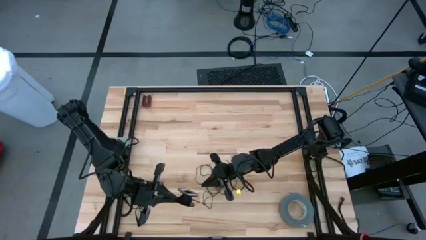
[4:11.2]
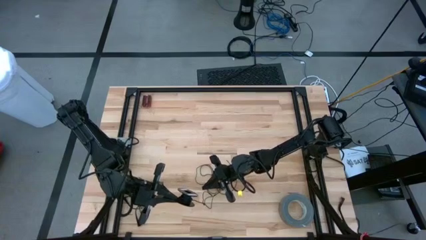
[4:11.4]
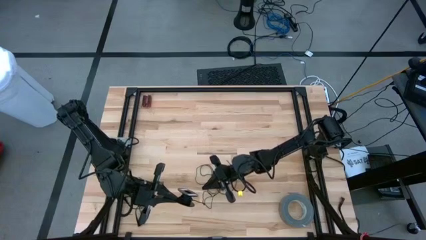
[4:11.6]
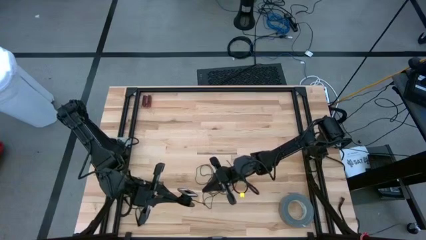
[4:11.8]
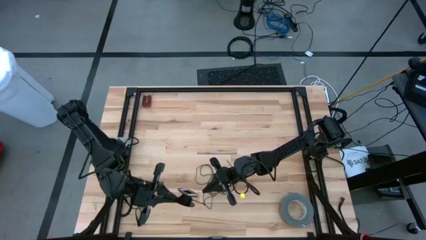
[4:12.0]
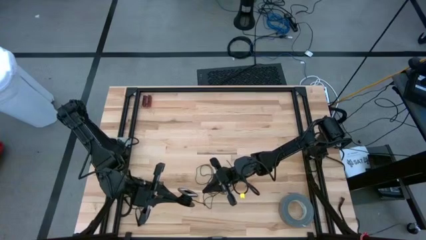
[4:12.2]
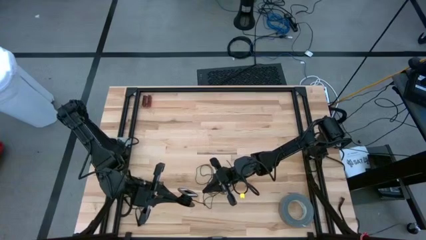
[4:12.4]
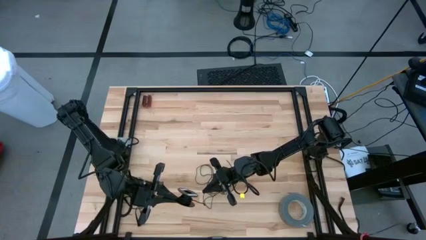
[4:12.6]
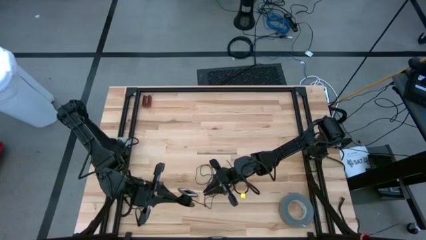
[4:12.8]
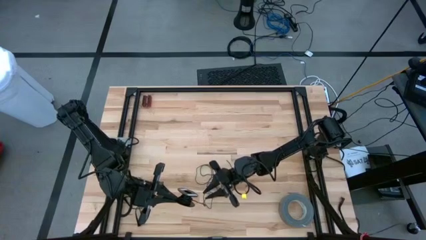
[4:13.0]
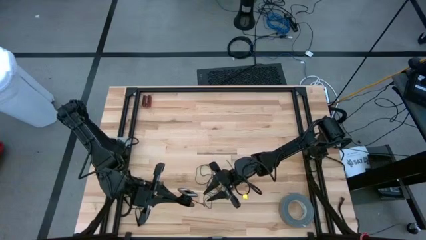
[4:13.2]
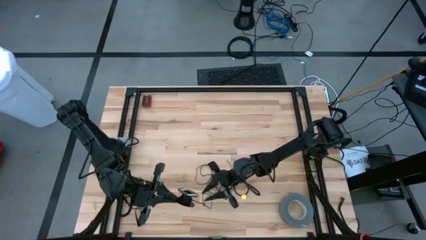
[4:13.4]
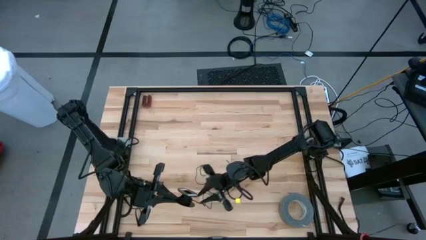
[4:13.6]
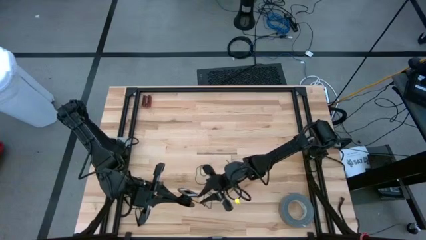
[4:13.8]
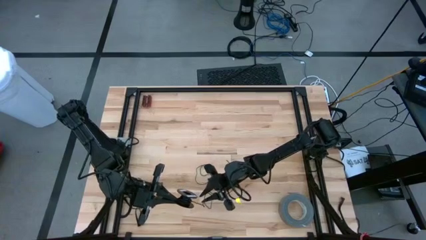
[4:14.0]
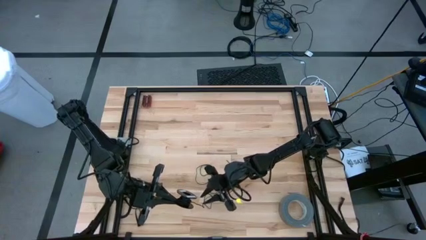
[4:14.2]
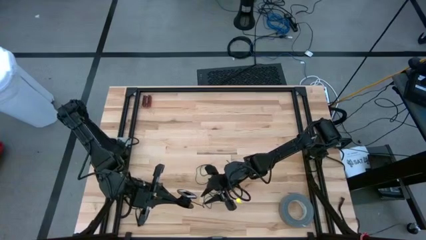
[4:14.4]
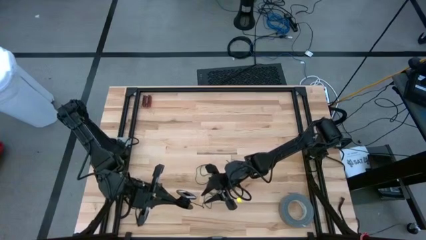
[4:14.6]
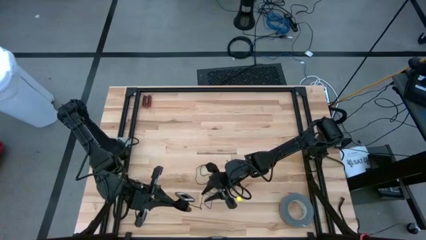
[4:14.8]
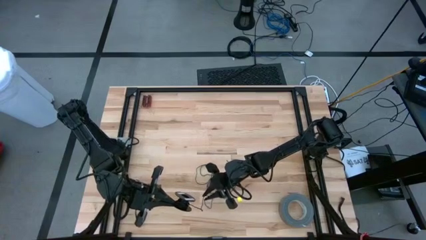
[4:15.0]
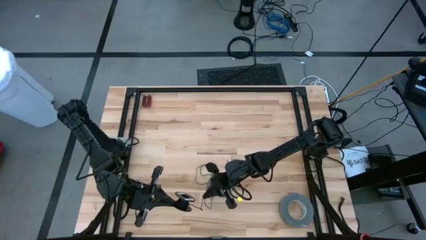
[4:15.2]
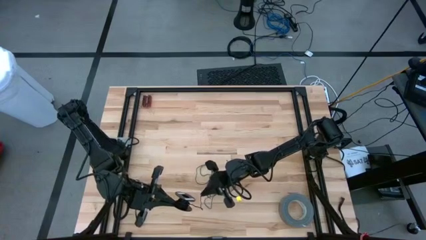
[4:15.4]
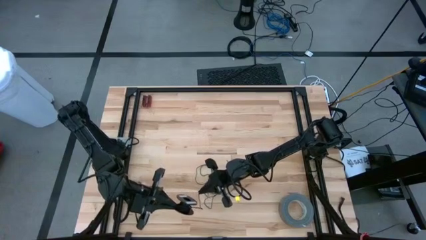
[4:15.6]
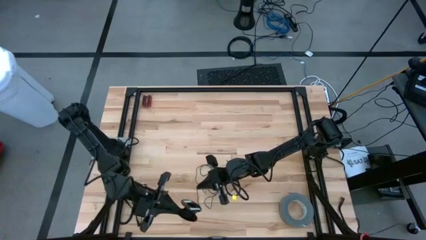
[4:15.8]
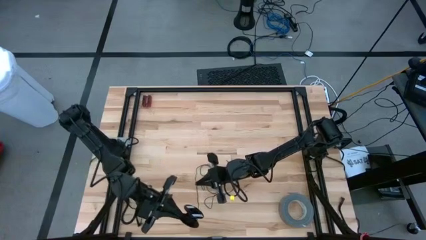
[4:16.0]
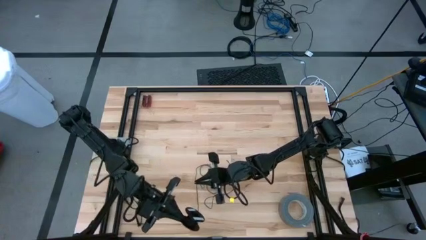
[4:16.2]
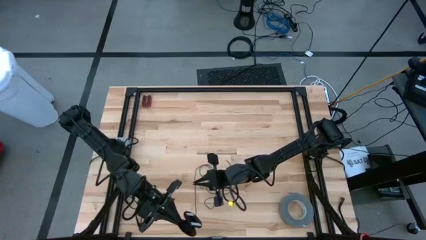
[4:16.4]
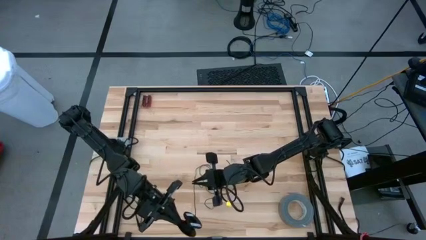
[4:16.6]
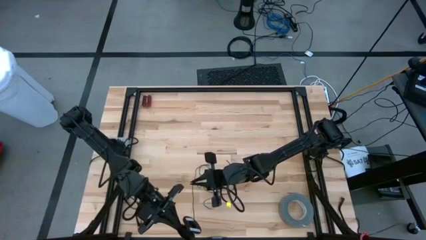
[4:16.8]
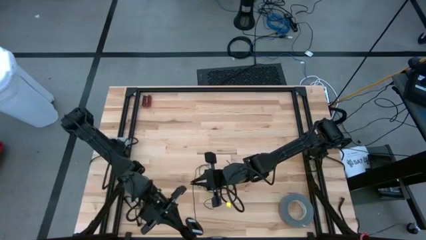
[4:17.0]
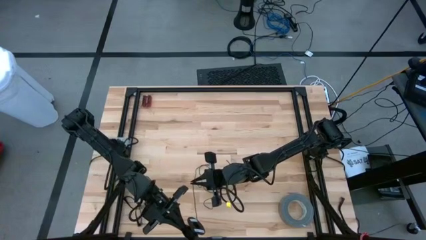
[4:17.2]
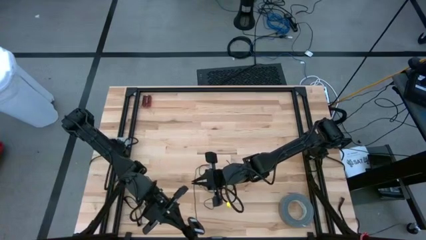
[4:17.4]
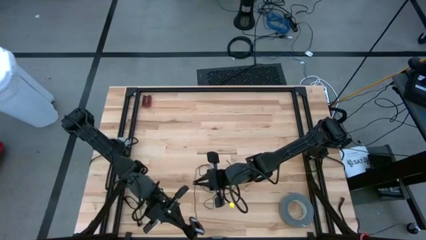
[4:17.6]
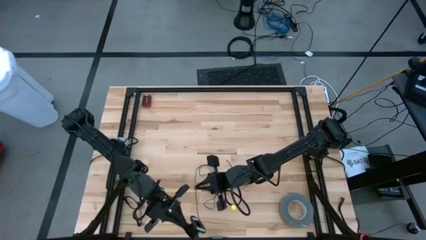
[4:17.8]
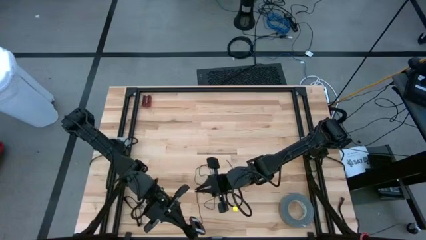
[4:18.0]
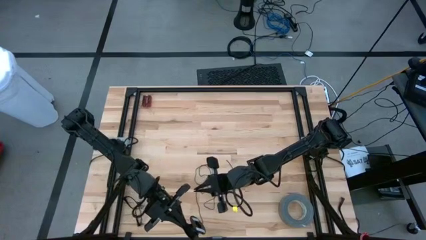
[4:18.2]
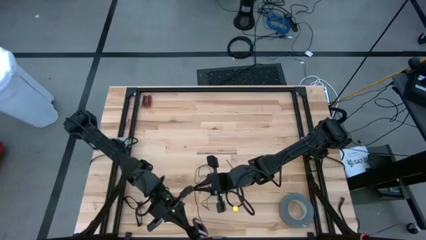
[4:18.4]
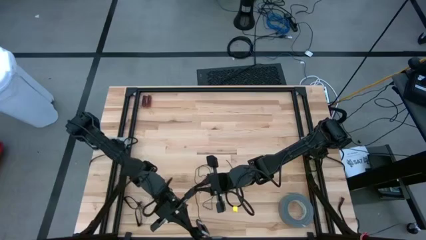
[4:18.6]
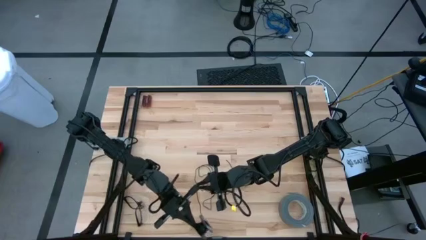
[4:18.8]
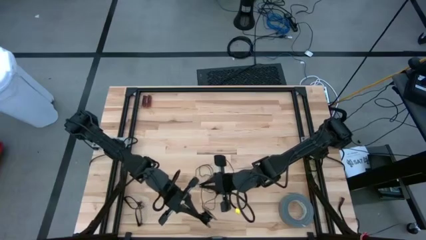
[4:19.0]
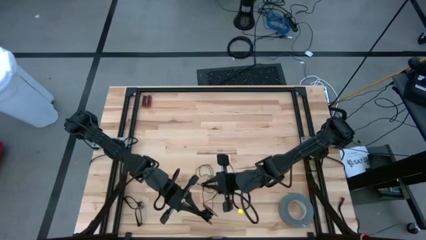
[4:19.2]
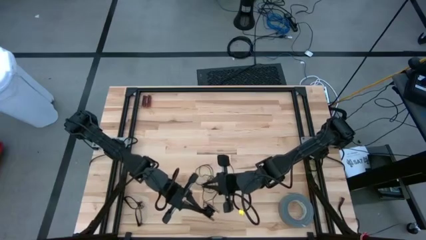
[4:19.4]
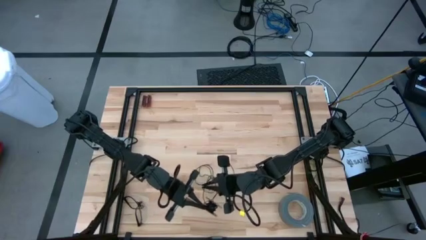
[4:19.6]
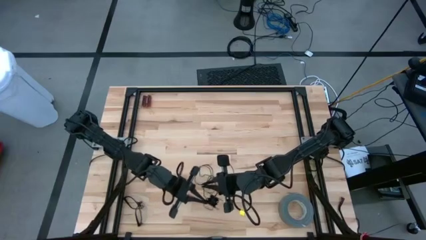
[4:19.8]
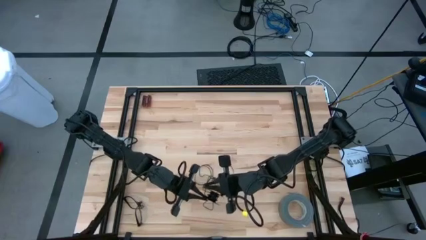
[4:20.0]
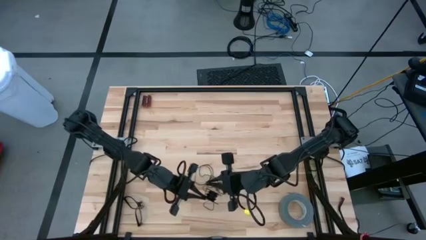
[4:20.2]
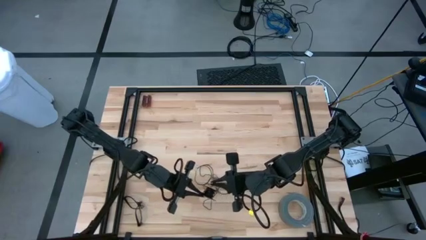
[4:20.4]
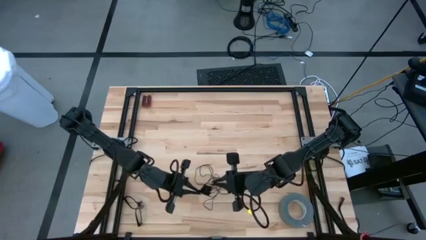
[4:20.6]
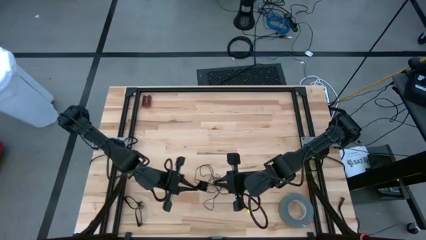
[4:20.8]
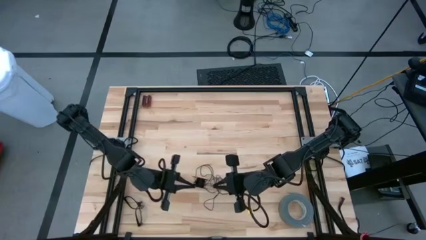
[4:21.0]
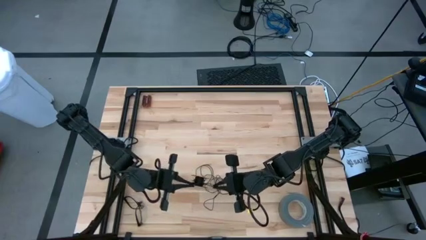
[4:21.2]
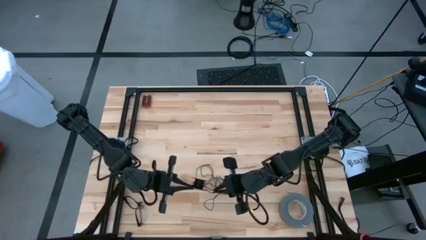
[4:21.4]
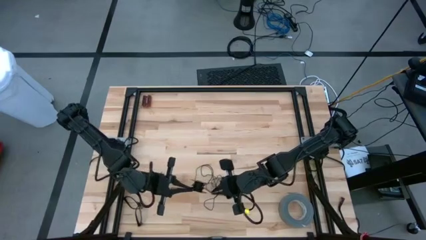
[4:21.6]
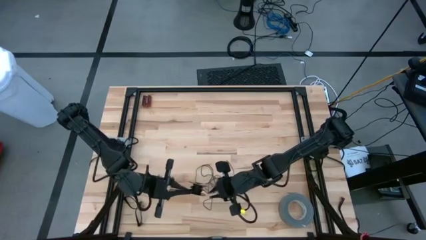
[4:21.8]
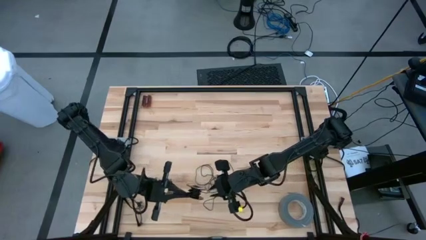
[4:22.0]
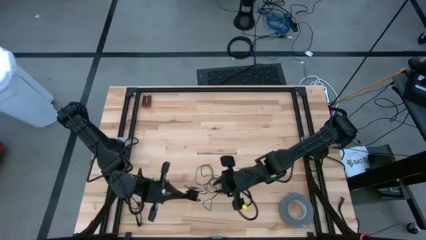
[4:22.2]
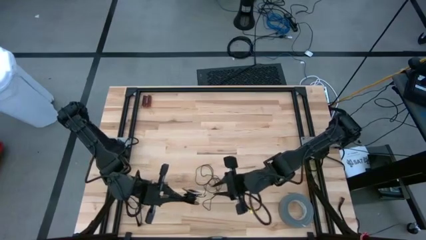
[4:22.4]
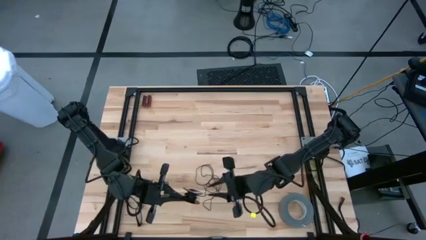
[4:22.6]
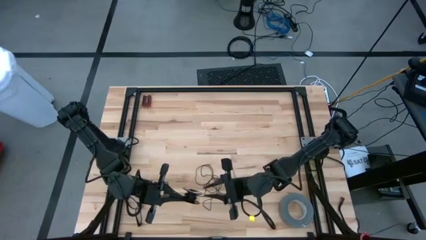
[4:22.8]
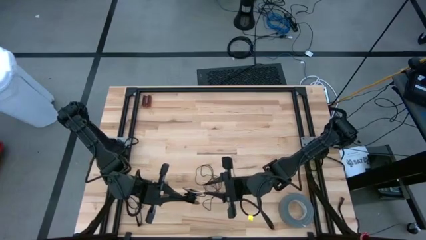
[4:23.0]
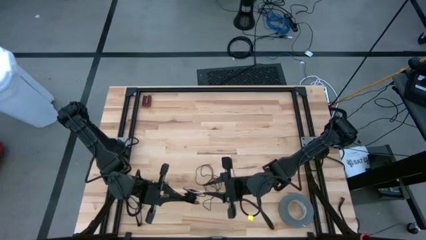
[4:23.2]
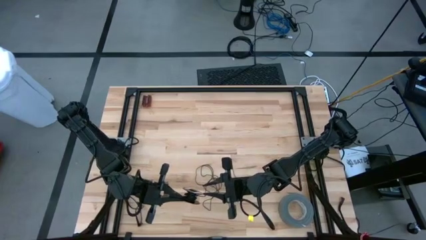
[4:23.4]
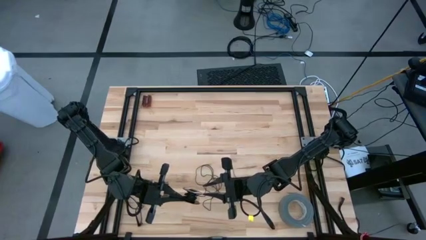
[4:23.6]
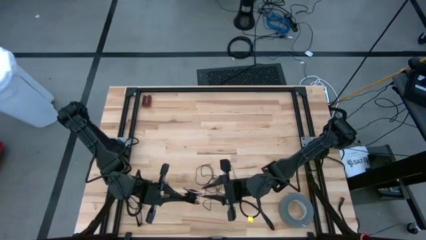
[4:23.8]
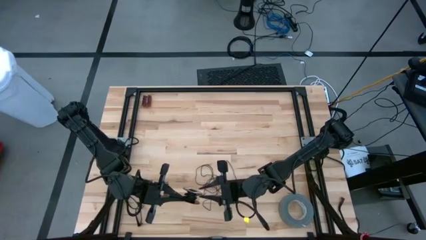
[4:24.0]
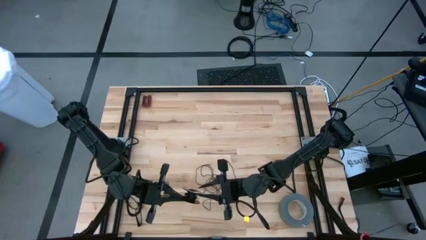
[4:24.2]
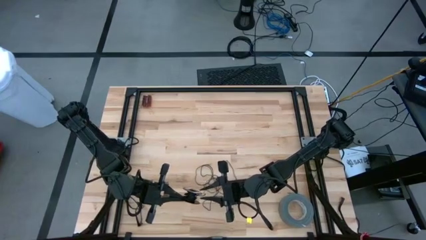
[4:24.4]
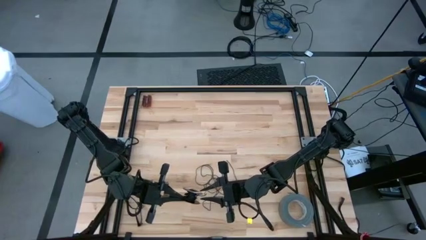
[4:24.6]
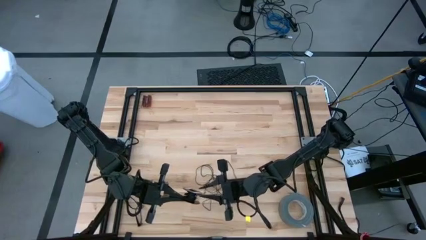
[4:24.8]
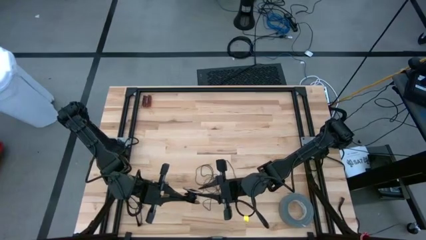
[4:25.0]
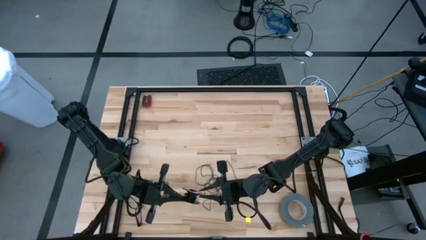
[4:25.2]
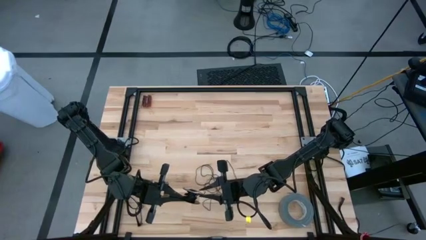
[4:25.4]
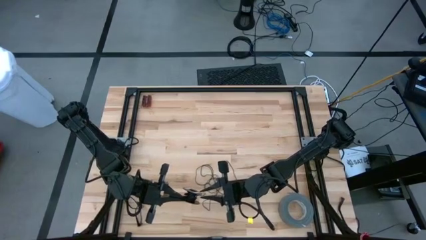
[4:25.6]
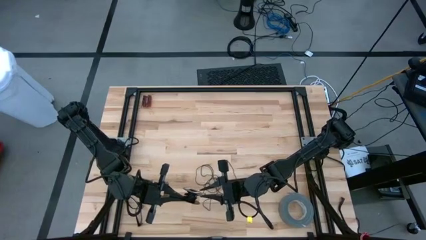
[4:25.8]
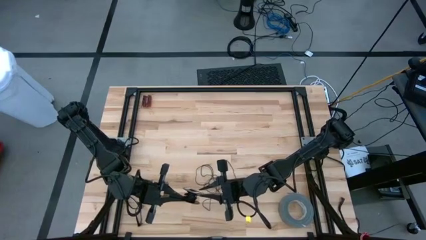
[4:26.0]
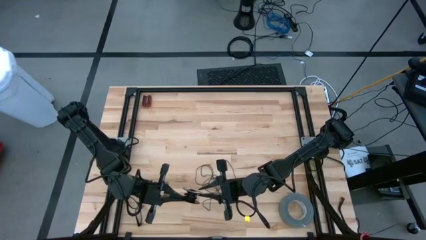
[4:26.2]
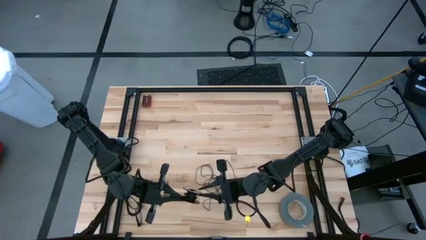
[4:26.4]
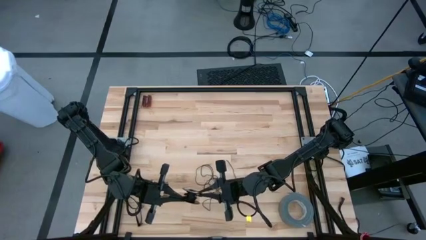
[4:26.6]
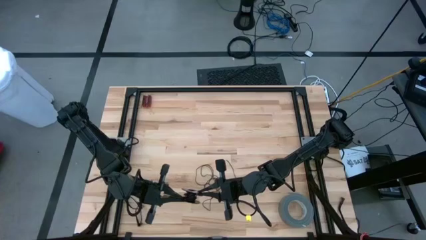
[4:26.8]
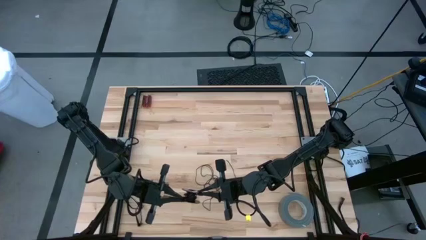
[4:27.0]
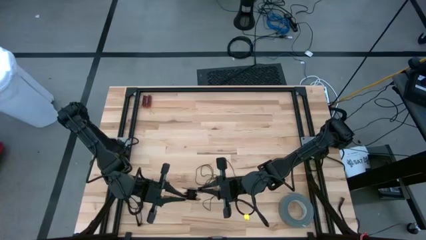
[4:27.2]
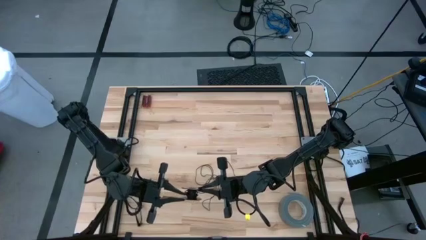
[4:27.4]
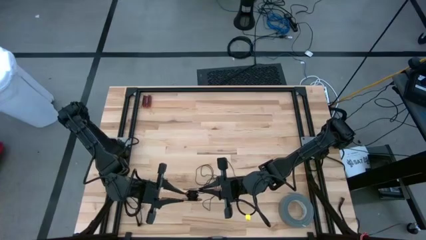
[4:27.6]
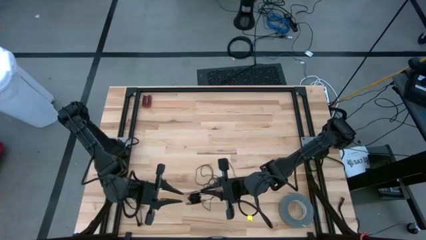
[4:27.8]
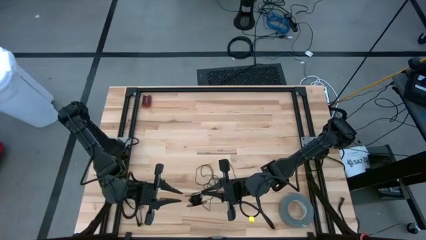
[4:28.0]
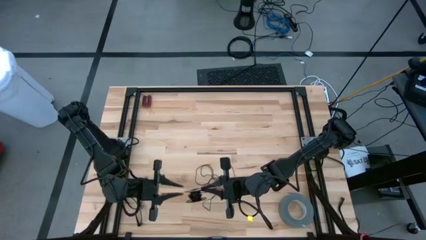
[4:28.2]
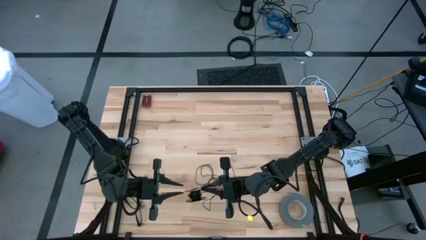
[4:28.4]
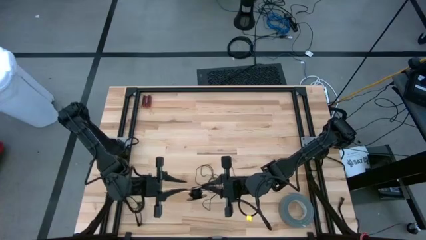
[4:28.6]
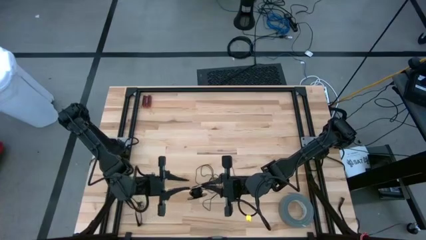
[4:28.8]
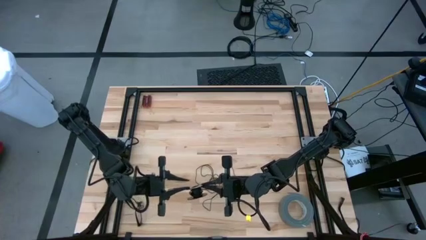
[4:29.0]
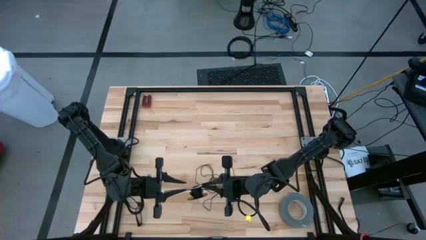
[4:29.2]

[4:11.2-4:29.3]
Task: Coil cords
Coil the black wire on the spool
